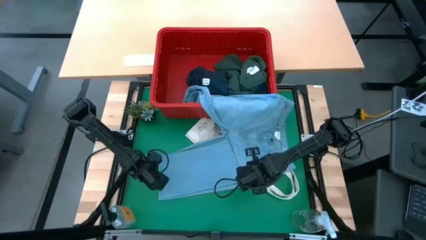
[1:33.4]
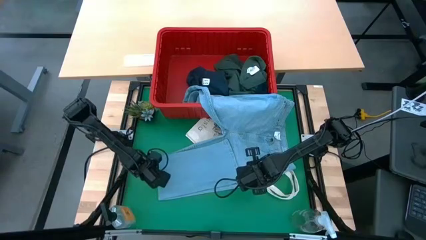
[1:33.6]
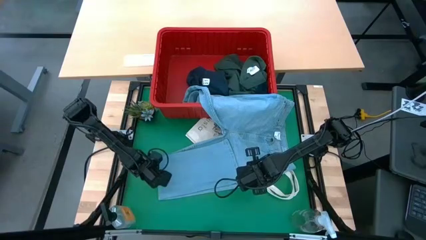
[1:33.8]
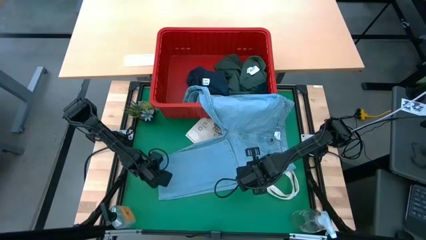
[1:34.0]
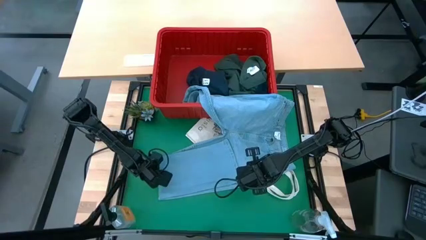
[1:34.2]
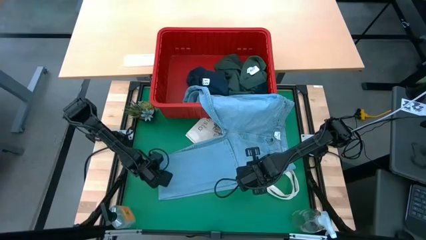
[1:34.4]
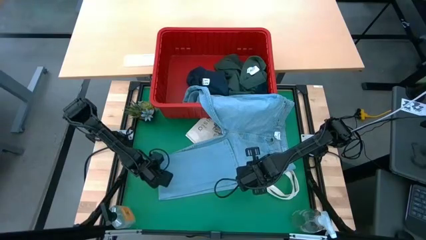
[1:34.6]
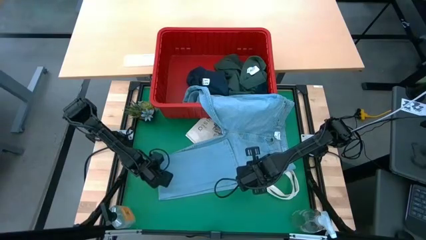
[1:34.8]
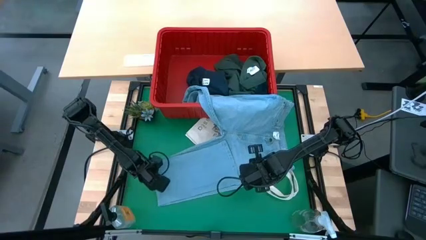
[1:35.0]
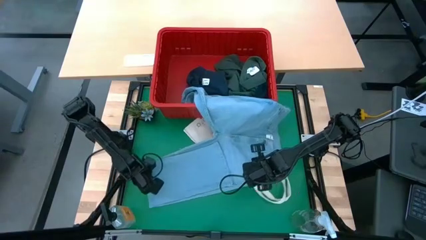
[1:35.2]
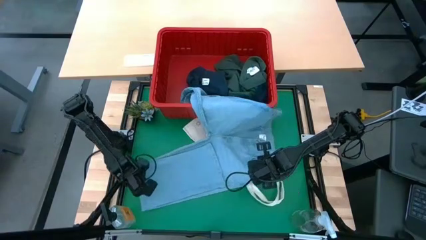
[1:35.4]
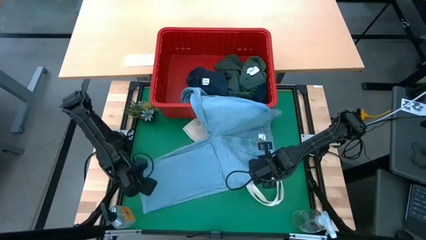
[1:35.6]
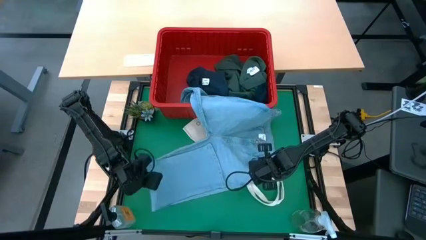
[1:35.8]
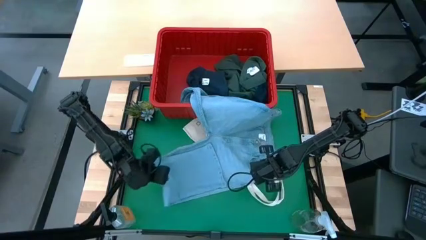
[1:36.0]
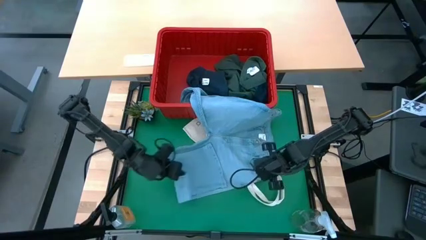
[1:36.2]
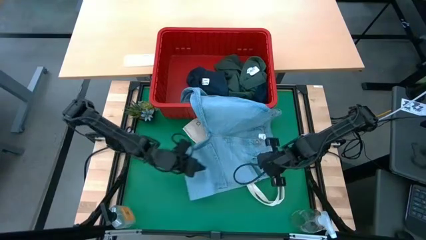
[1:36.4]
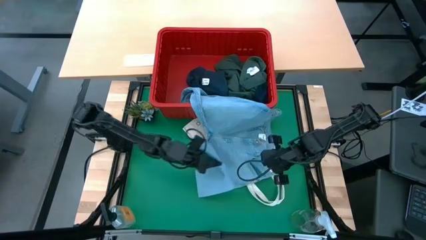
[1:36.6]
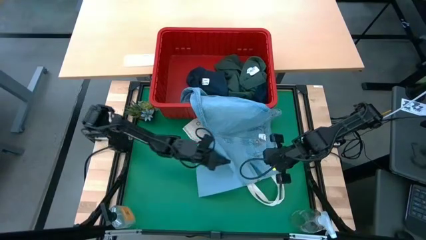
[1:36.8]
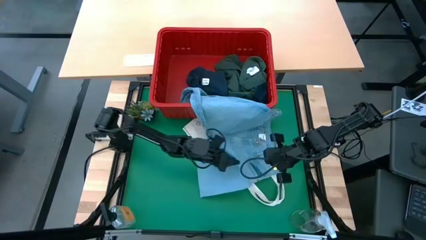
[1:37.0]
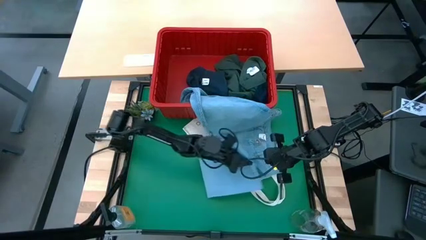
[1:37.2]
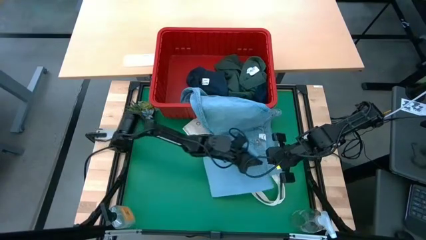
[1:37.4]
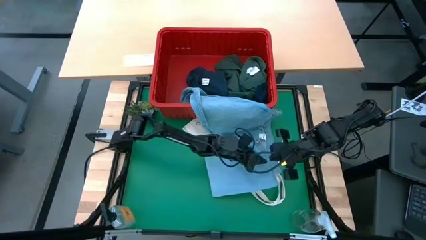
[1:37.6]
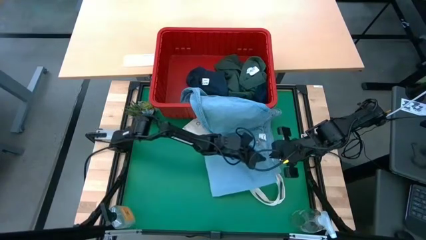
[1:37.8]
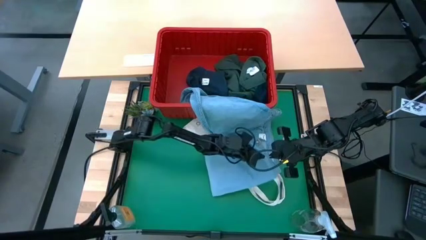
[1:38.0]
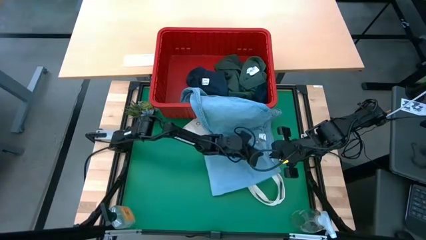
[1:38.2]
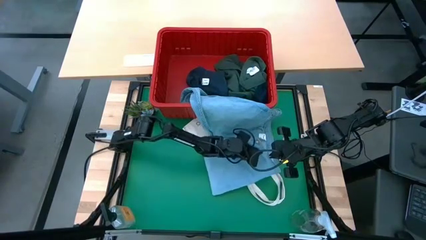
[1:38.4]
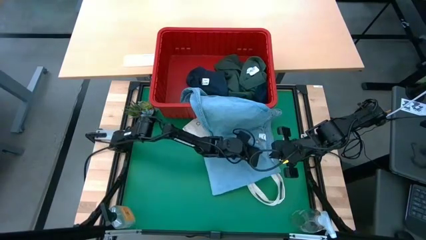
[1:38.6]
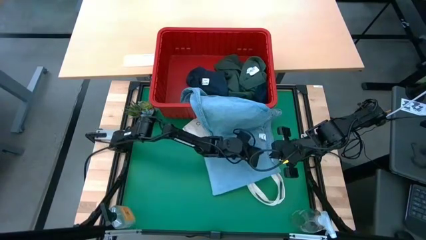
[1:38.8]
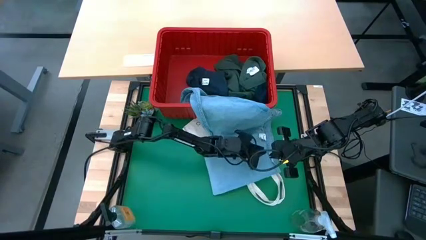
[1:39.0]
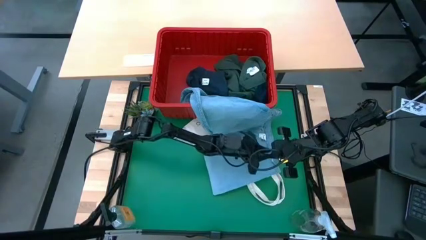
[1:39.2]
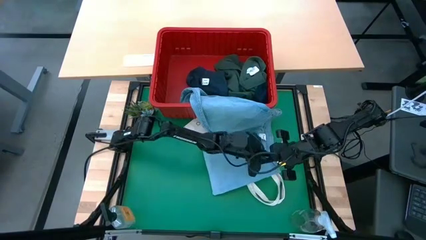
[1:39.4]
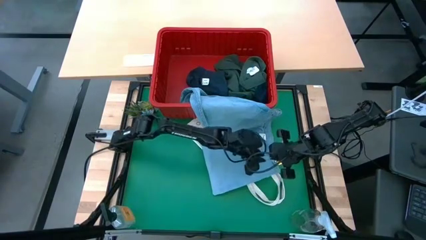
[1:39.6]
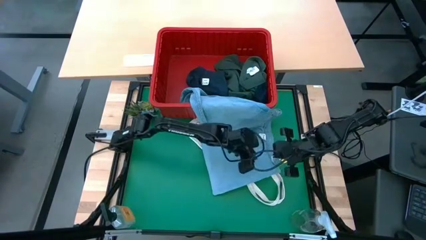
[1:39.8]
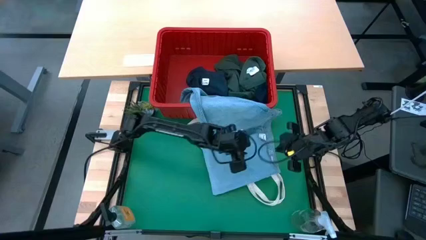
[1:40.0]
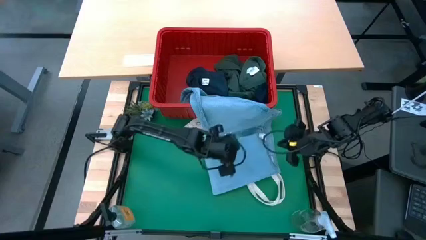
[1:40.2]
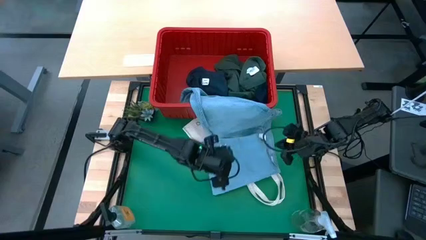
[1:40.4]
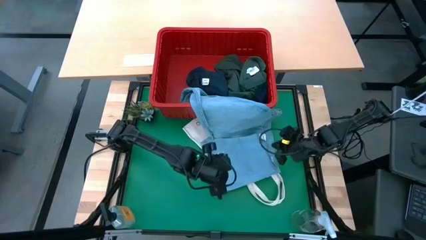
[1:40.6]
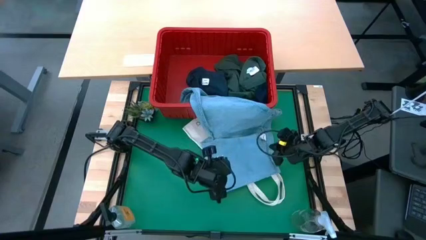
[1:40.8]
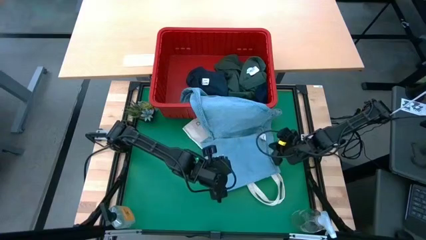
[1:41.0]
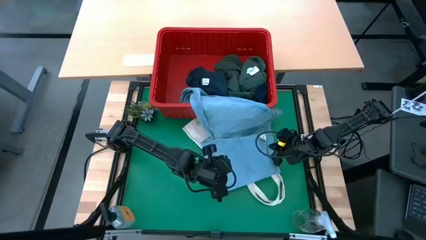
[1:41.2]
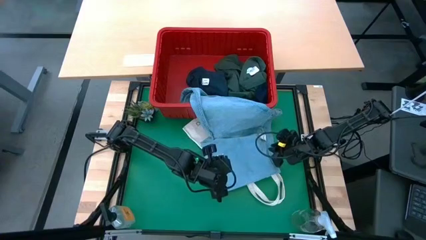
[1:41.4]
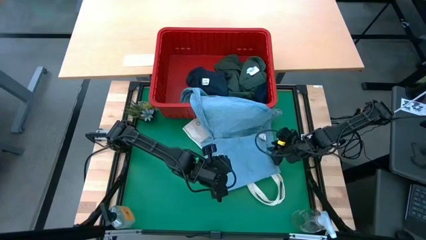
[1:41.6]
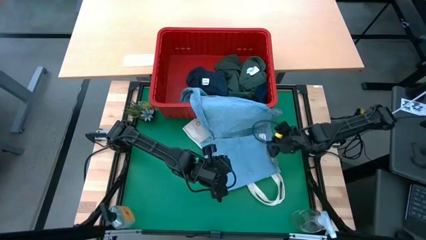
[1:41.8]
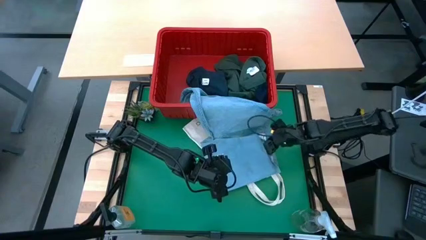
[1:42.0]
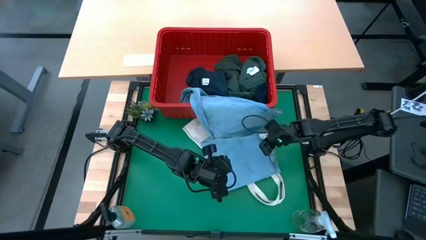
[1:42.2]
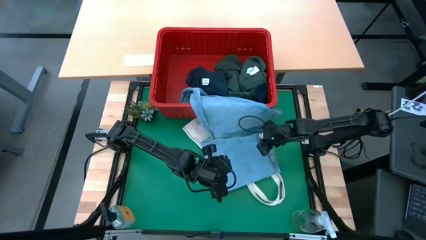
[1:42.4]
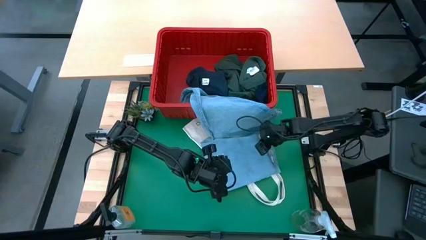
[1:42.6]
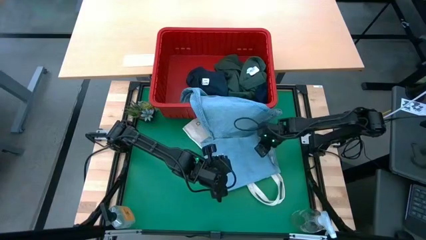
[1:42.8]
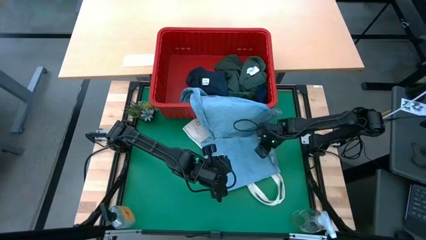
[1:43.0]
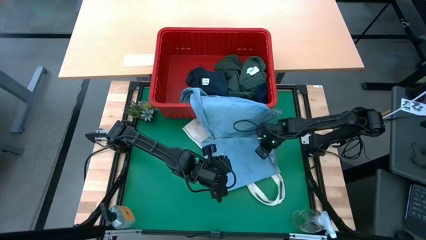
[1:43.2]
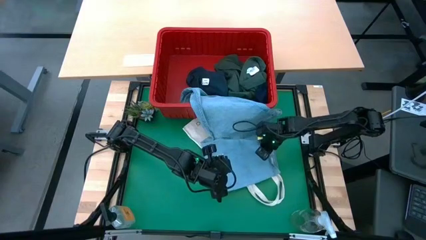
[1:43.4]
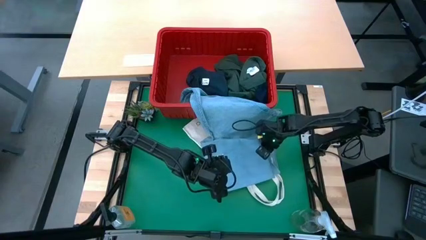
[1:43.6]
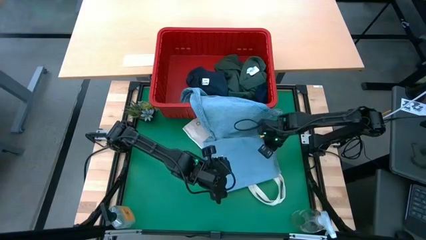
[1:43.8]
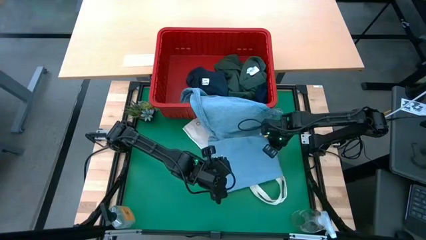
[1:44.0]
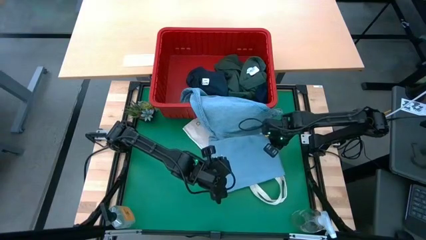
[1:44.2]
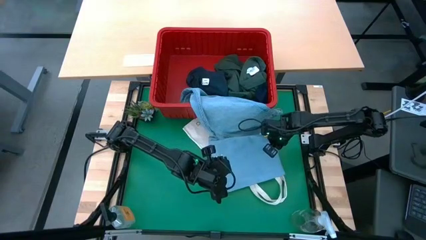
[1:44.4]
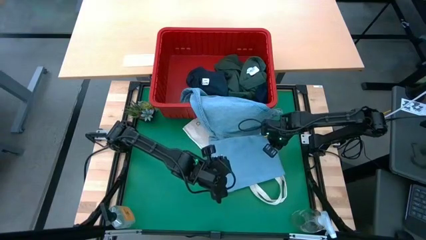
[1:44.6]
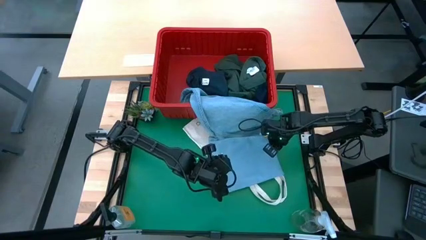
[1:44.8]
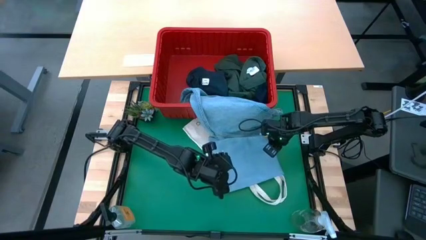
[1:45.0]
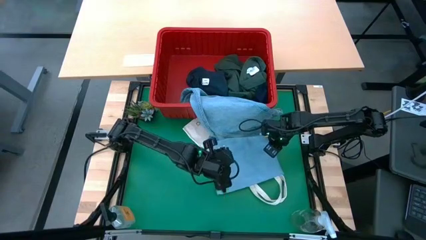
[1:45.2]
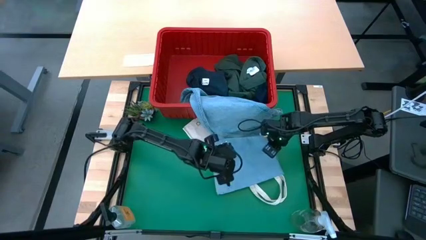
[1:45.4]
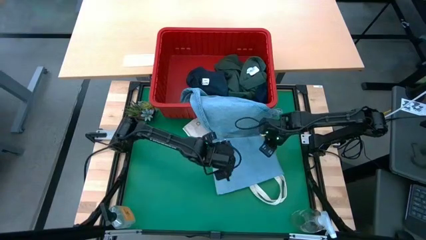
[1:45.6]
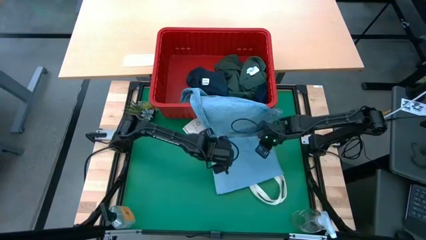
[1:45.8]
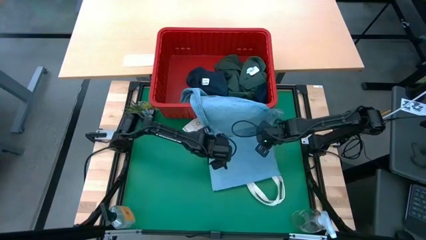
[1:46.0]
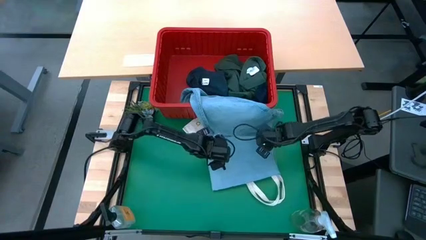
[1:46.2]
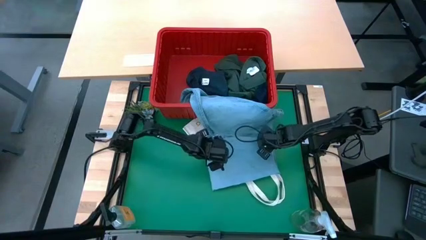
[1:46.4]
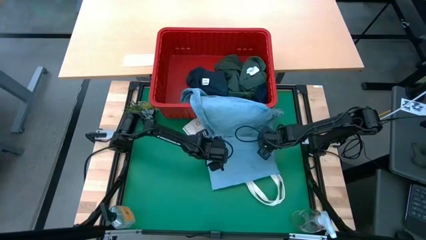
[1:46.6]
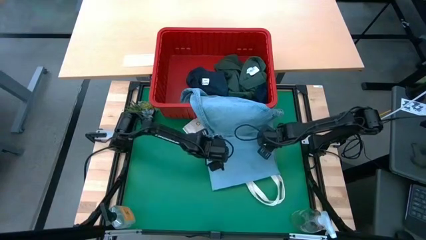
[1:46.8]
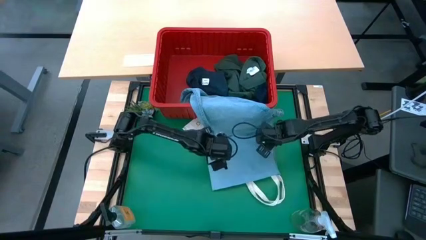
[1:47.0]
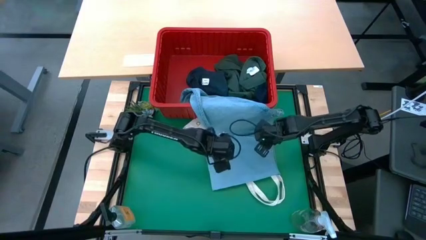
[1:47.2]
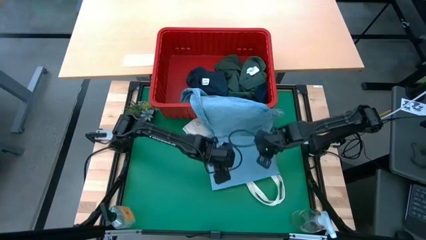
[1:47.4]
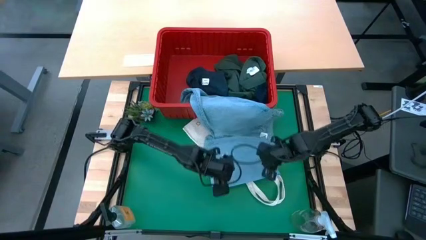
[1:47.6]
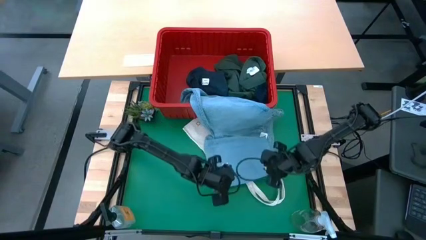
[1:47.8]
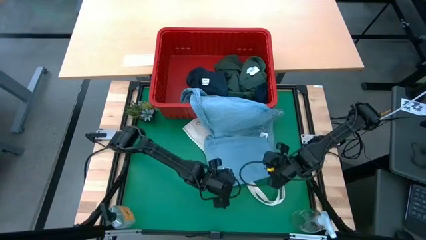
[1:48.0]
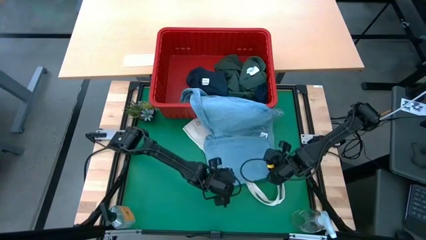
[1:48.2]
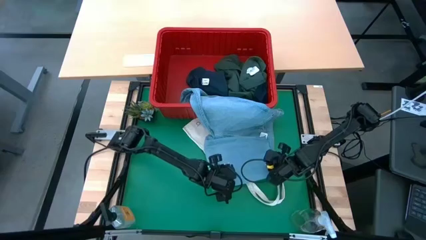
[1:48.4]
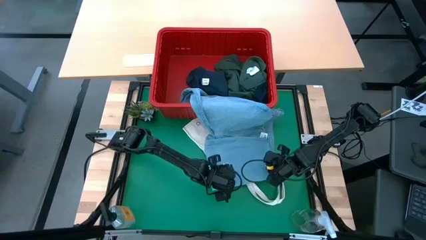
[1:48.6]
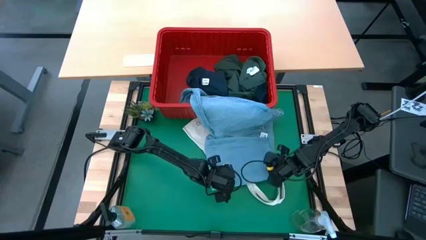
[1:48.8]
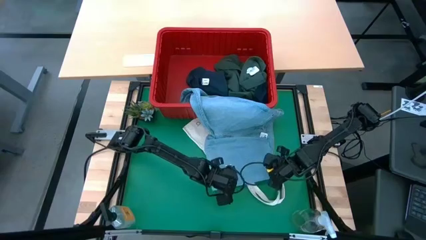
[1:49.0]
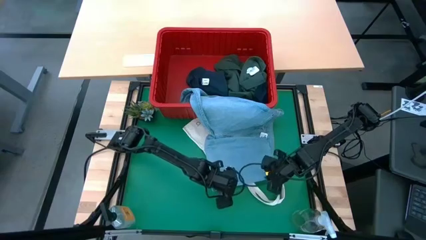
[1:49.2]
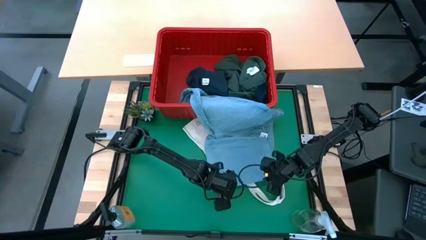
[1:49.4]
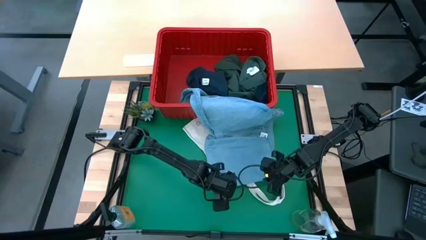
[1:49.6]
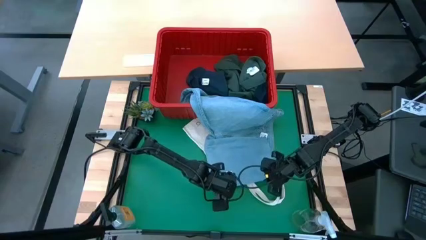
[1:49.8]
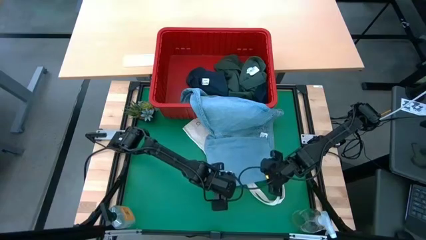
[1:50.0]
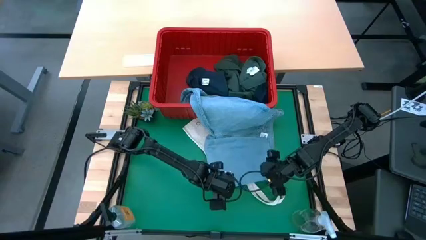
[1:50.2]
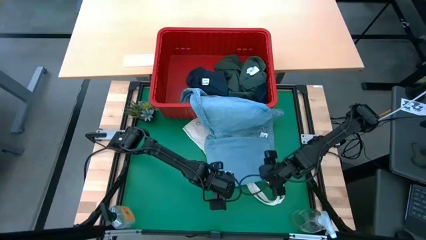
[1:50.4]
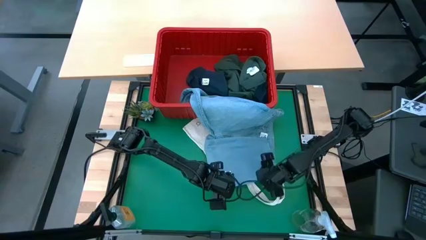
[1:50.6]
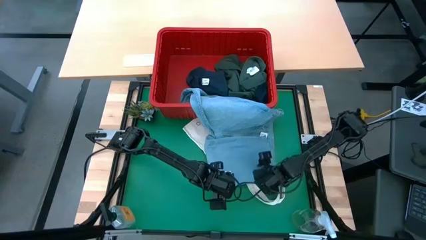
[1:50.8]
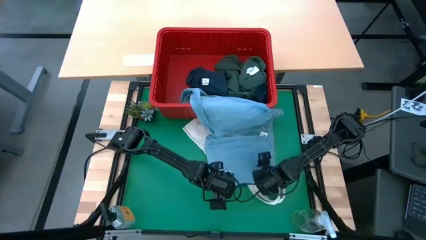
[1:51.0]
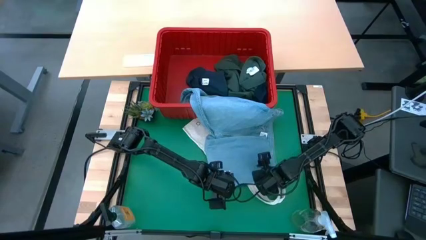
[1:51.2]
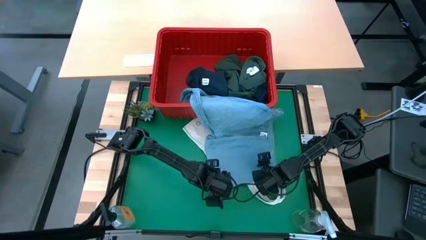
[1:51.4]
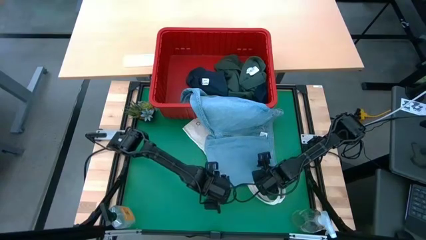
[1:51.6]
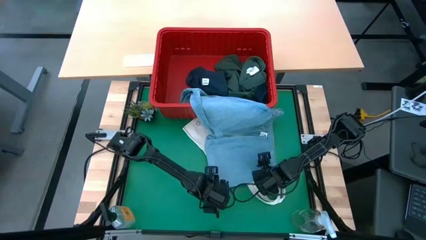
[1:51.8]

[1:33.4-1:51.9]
Task: Fold laundry
Fold the light blue pants
